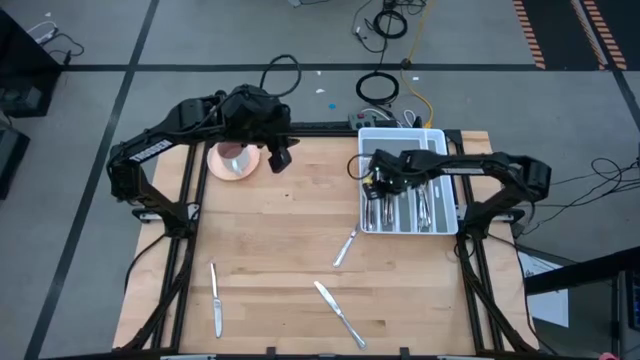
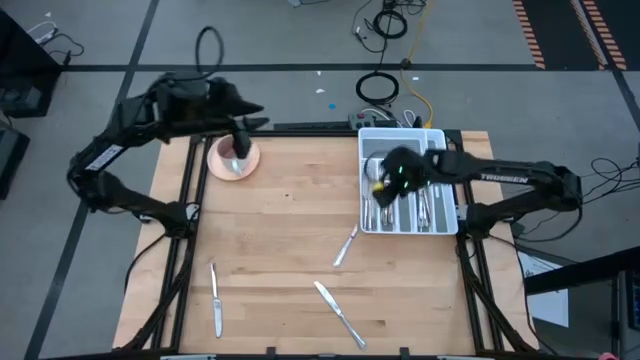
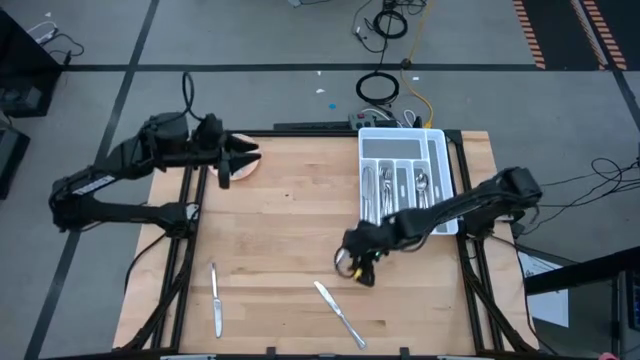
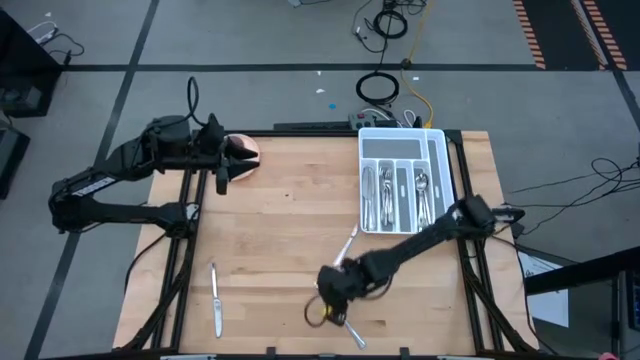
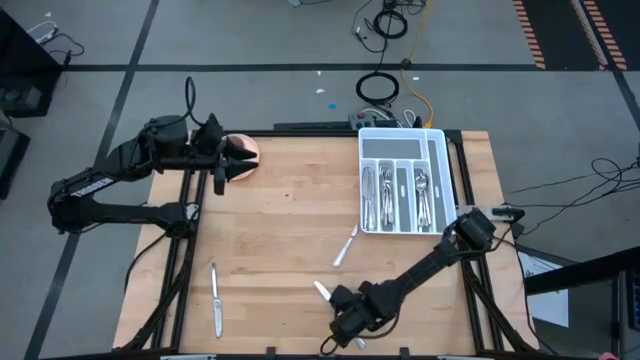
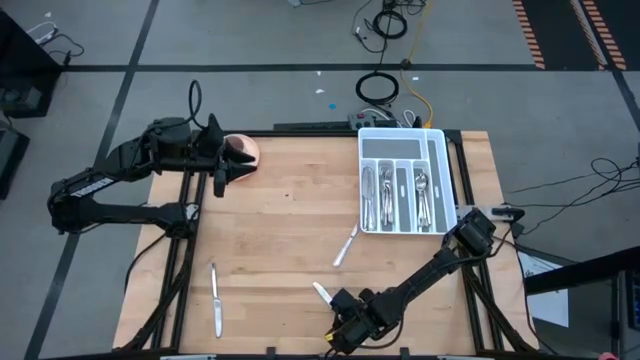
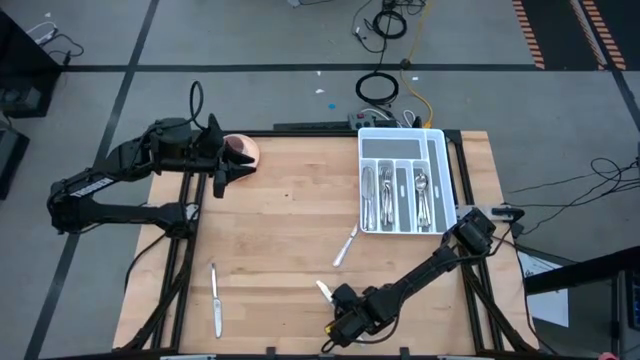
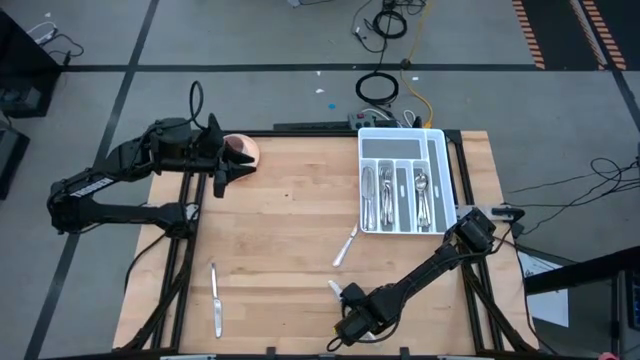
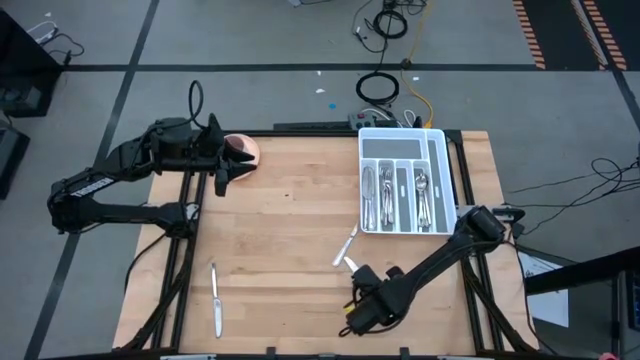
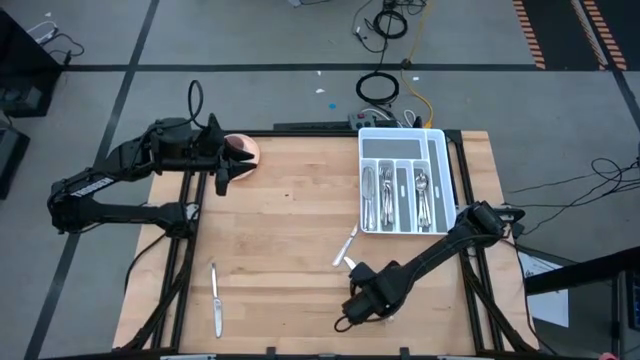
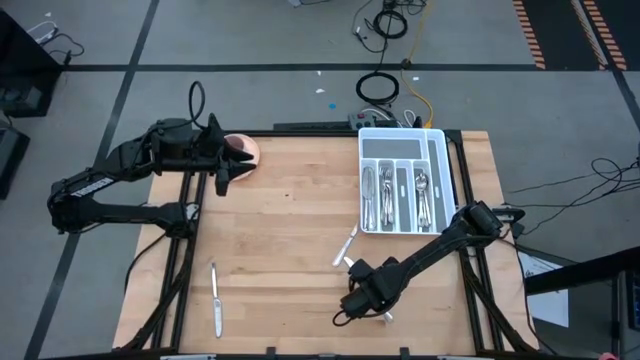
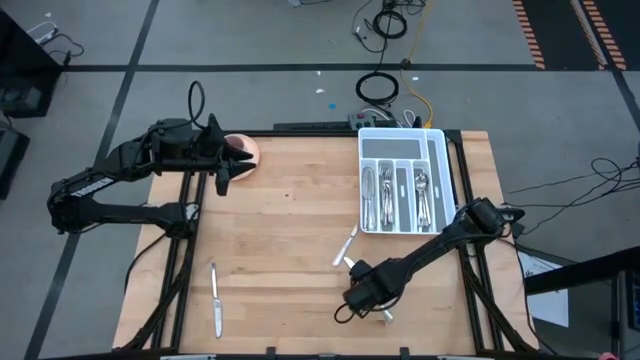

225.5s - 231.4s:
Task: Sort silverware
Put the silver knife into the white silverware tray

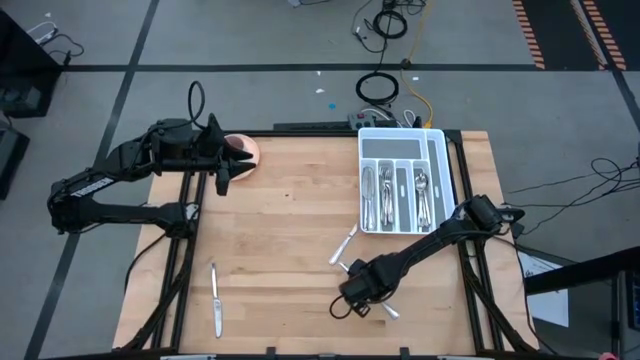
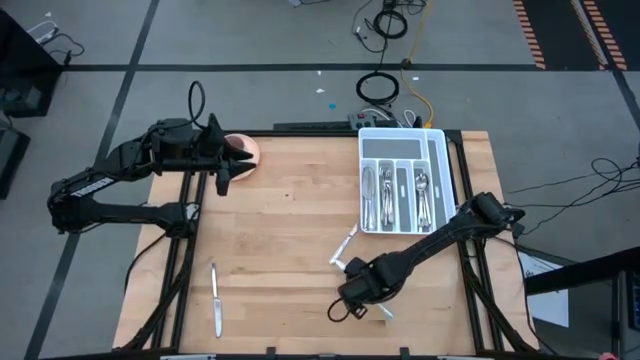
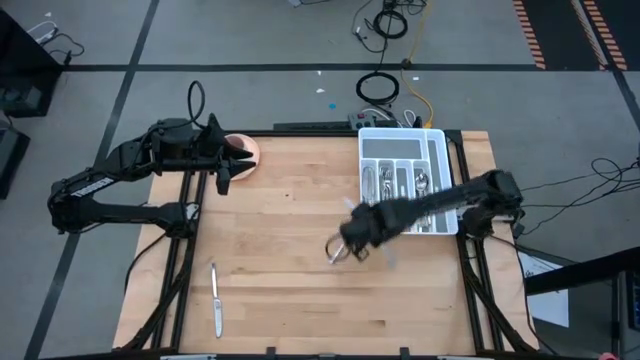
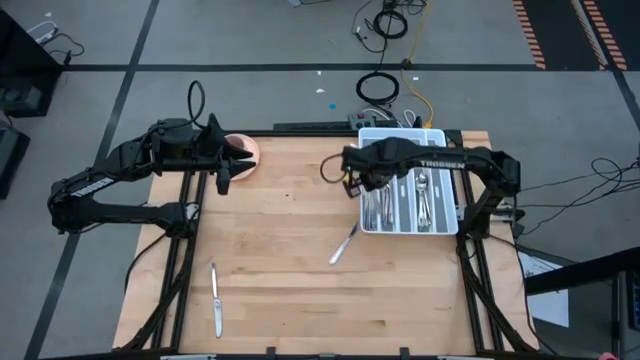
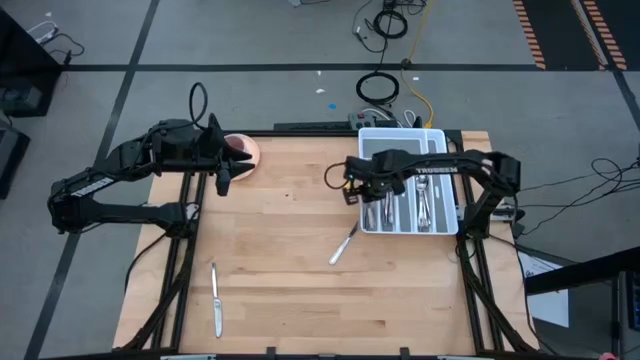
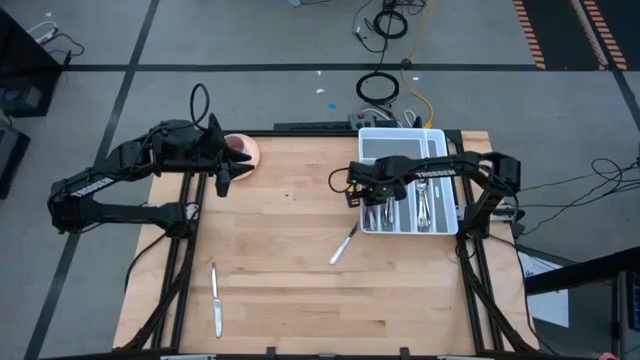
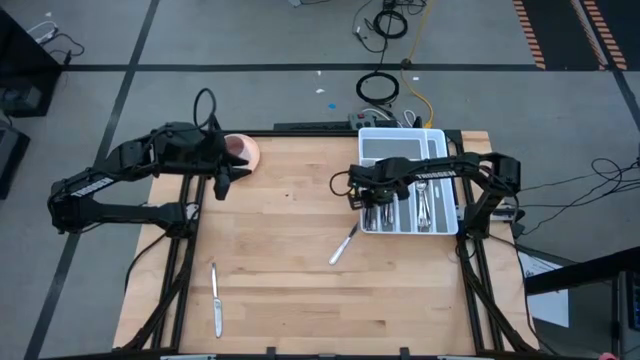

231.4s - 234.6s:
Put the silver knife into the white silverware tray

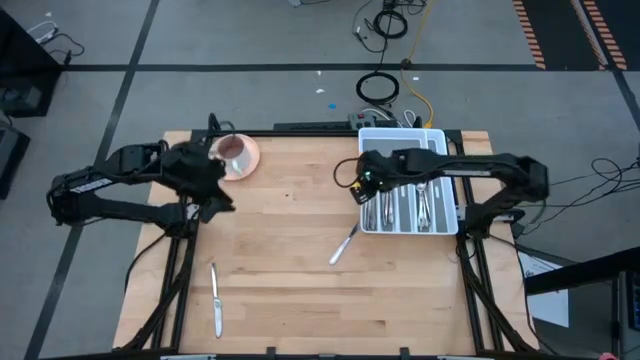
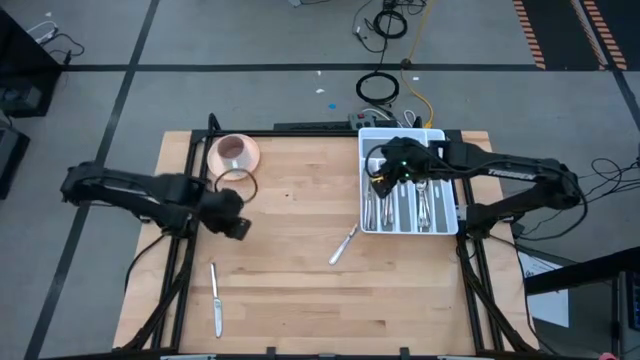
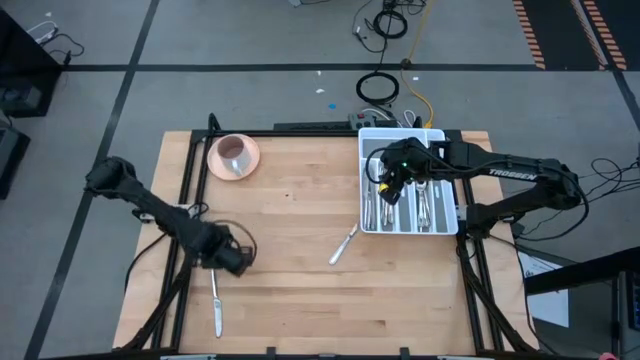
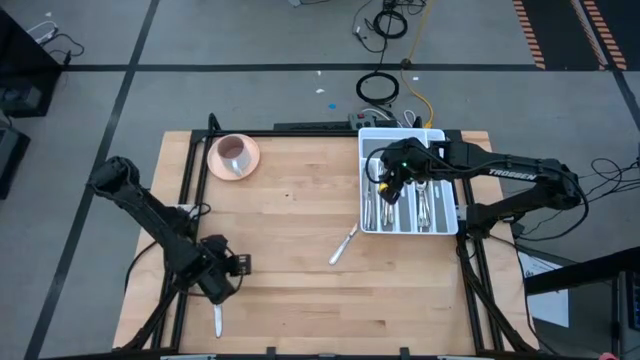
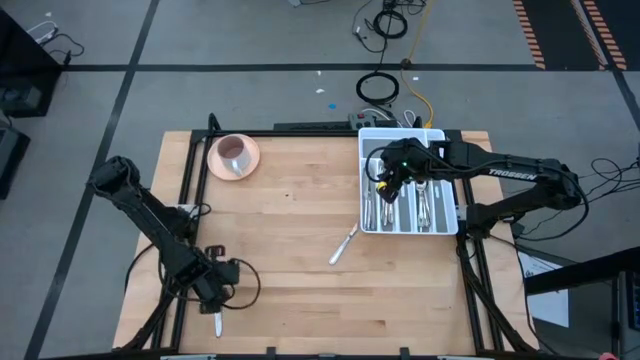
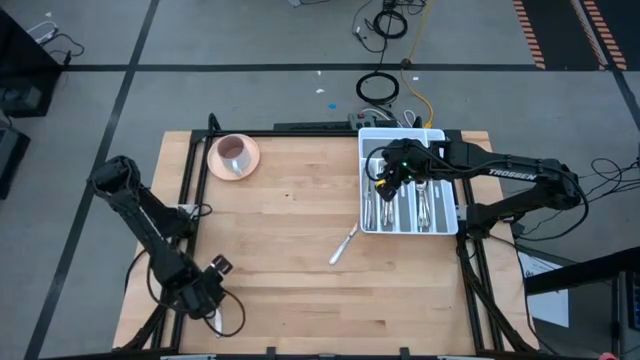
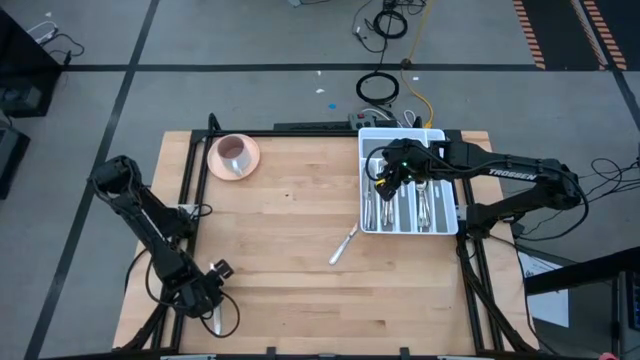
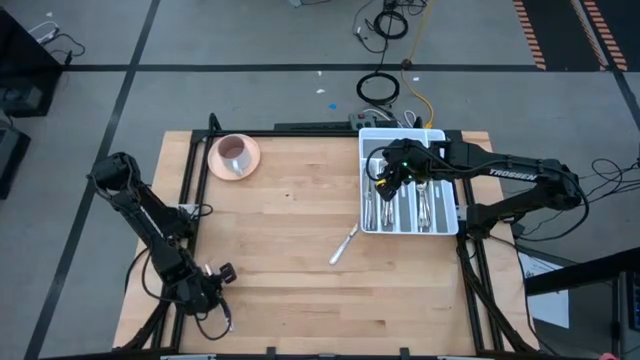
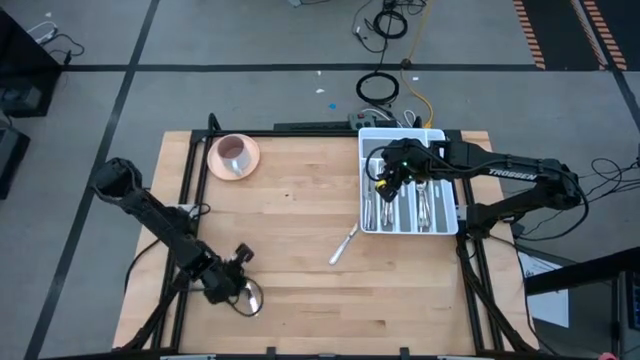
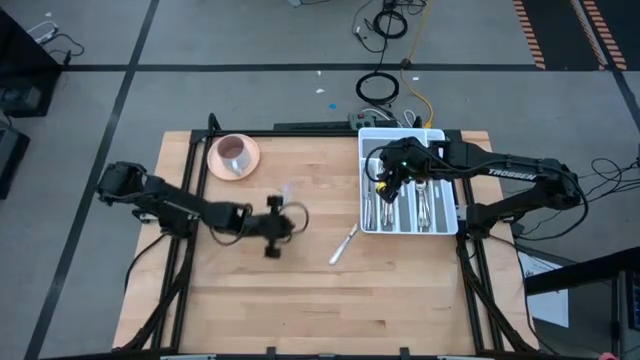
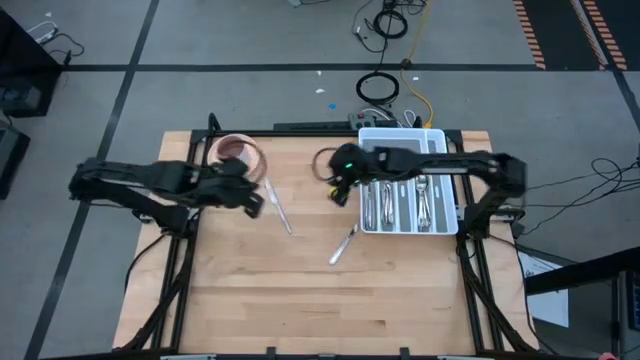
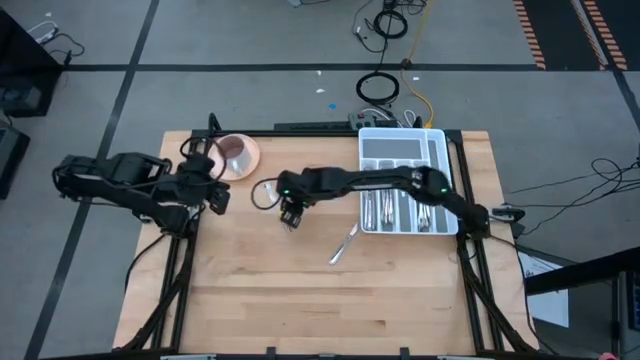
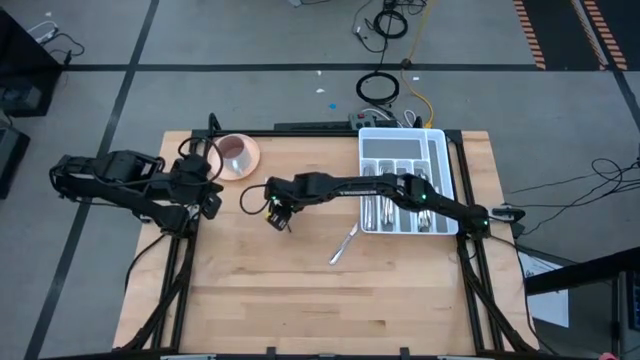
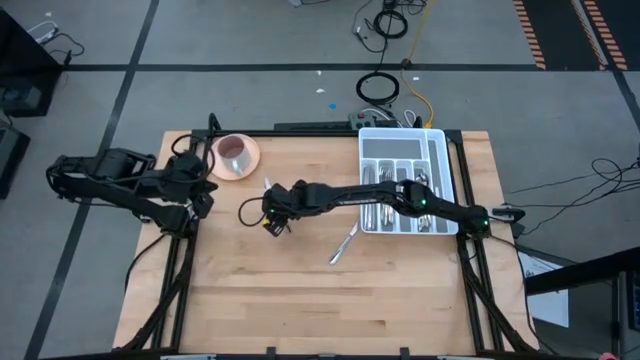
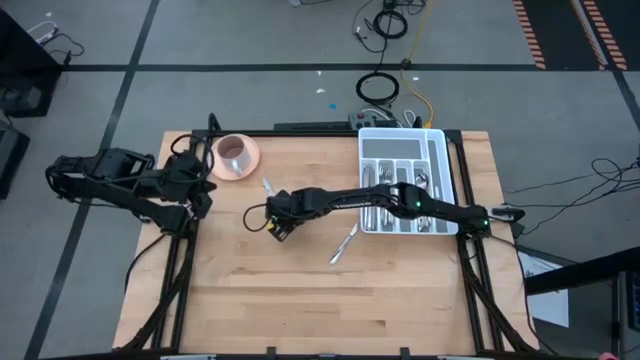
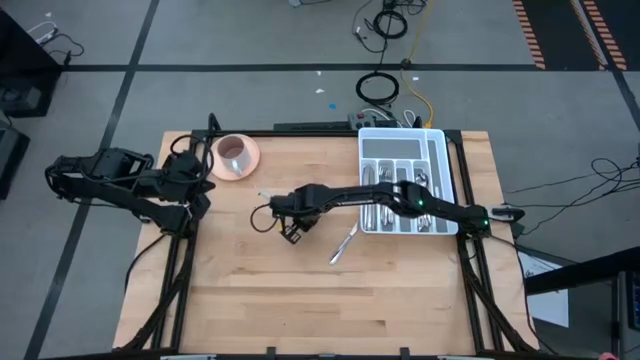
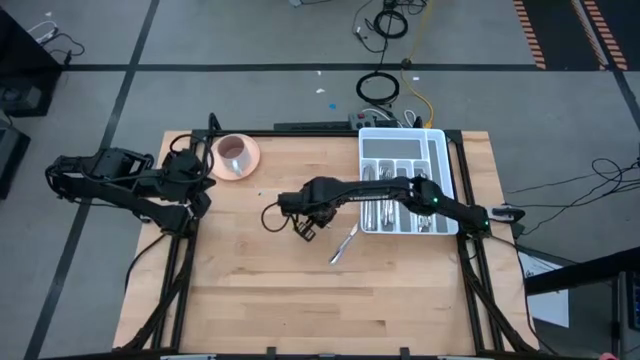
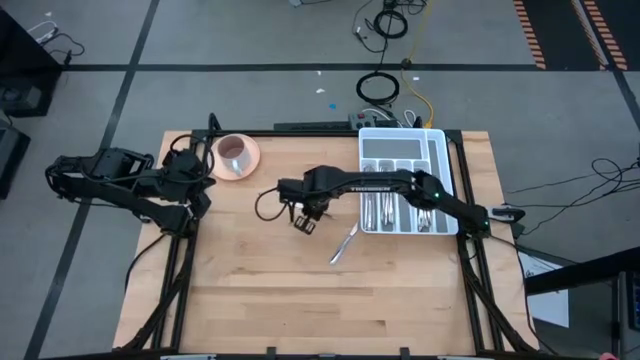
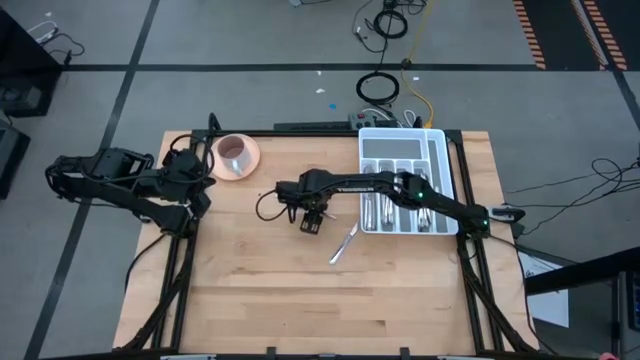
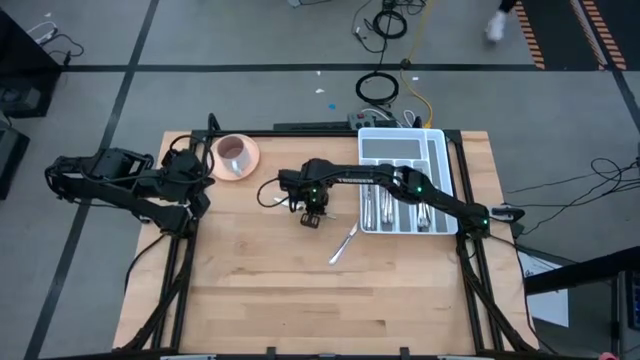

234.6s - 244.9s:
Put the silver knife into the white silverware tray

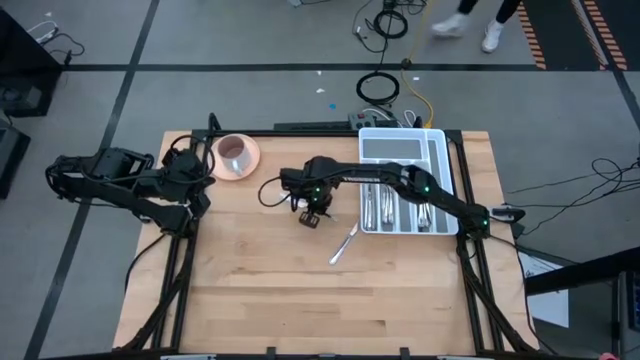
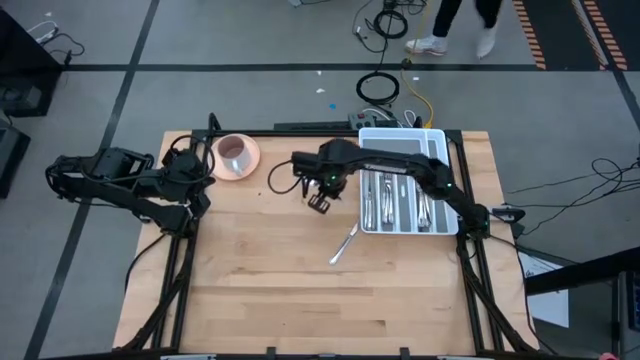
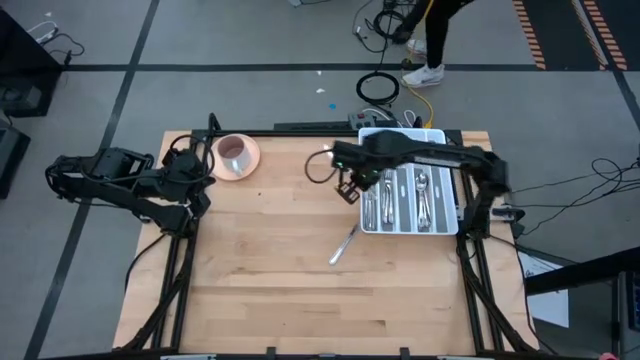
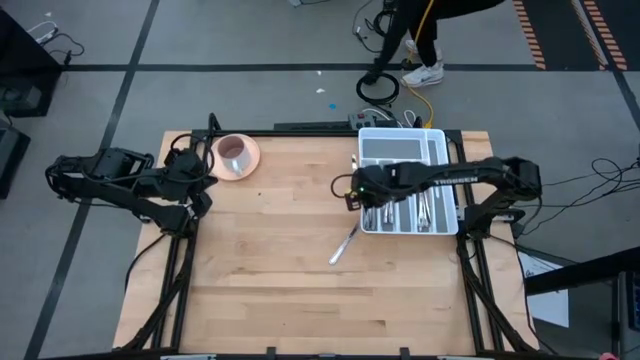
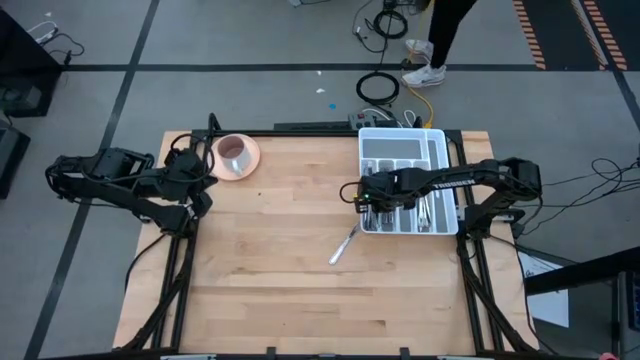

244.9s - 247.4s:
Put the silver knife into the white silverware tray
